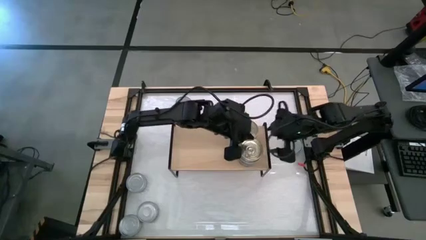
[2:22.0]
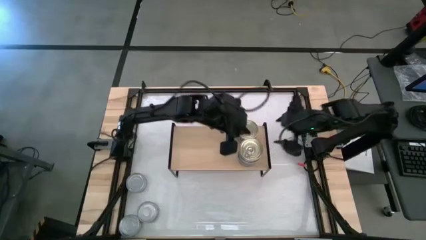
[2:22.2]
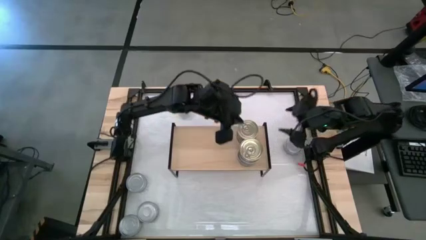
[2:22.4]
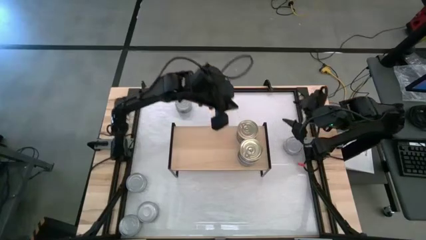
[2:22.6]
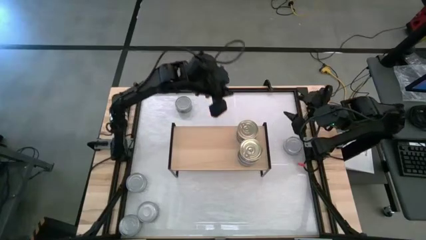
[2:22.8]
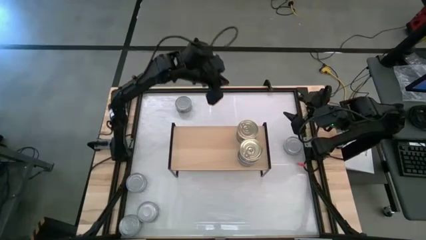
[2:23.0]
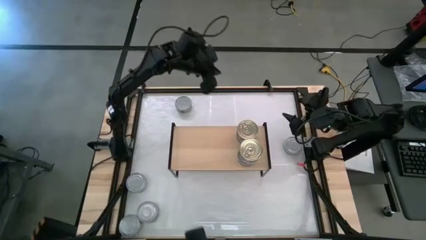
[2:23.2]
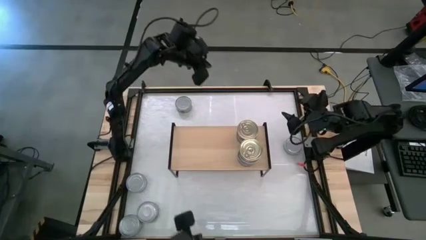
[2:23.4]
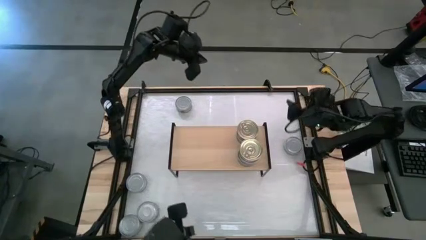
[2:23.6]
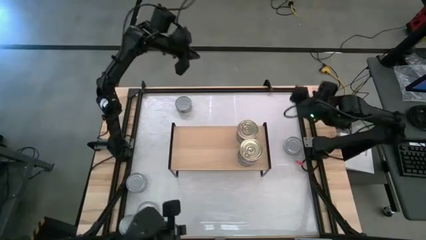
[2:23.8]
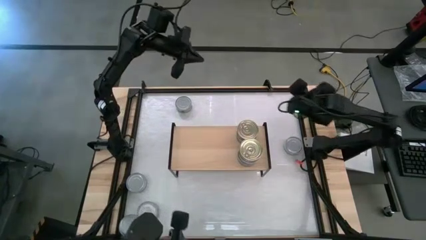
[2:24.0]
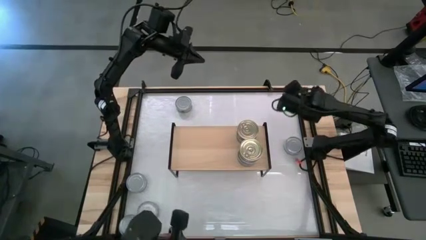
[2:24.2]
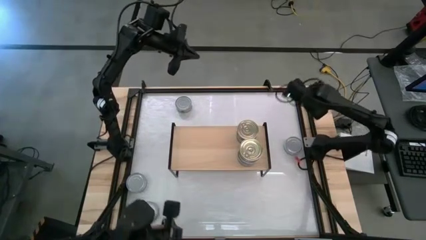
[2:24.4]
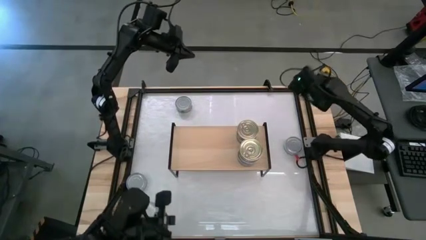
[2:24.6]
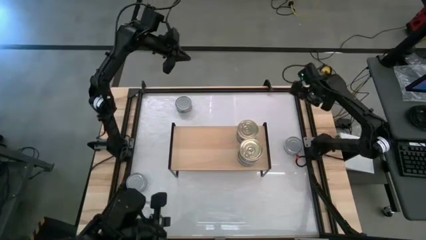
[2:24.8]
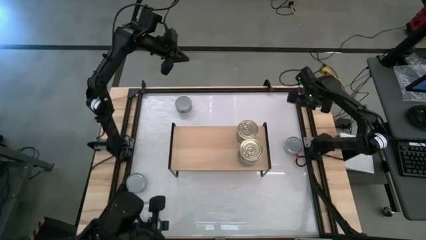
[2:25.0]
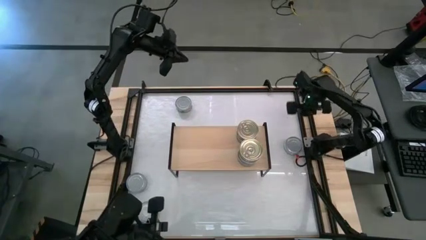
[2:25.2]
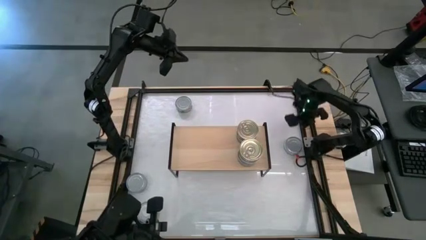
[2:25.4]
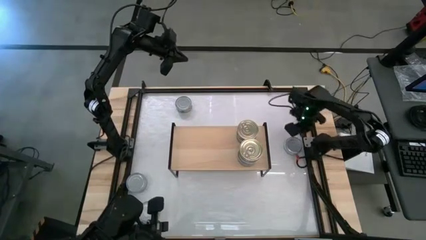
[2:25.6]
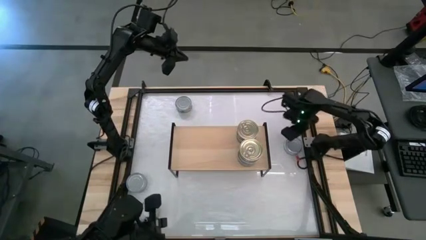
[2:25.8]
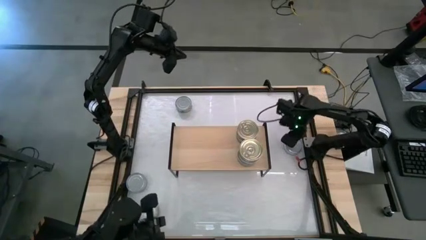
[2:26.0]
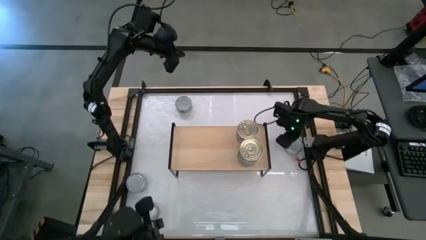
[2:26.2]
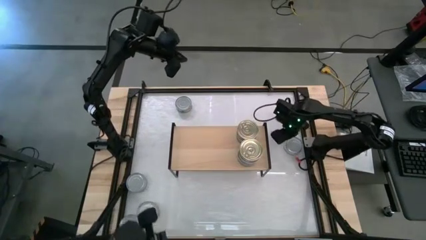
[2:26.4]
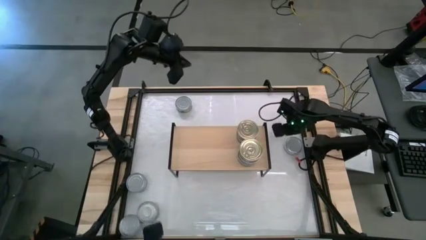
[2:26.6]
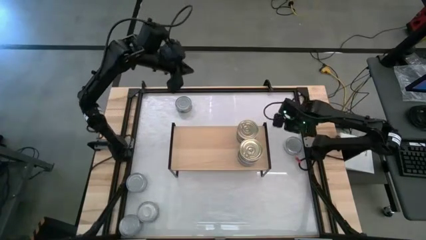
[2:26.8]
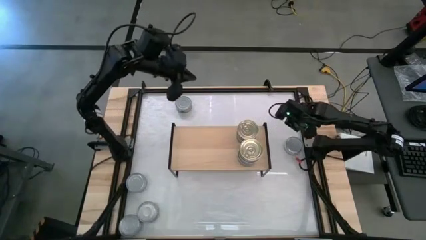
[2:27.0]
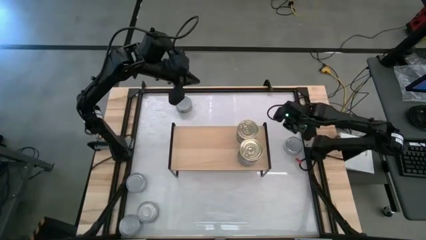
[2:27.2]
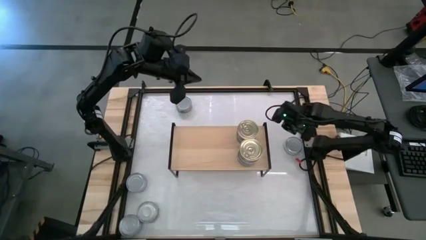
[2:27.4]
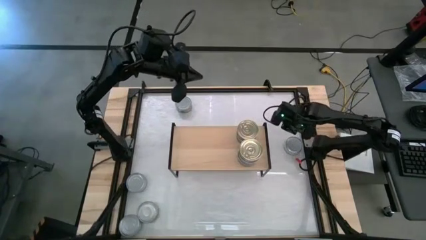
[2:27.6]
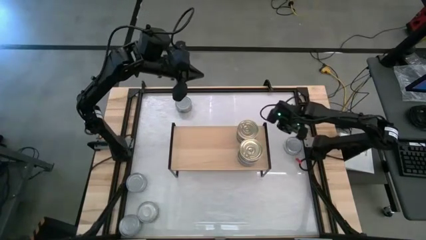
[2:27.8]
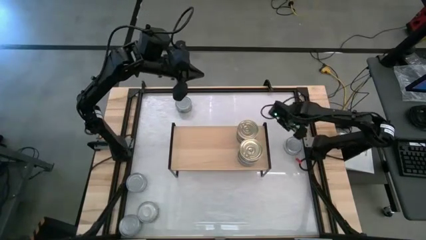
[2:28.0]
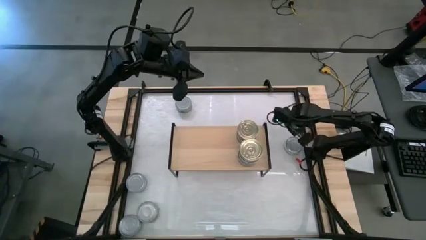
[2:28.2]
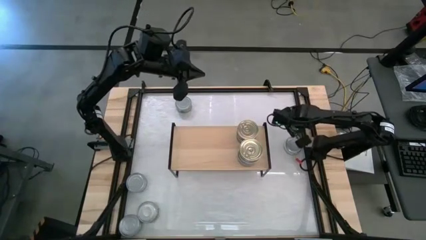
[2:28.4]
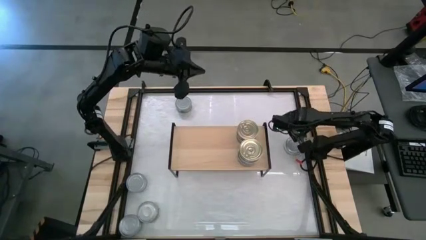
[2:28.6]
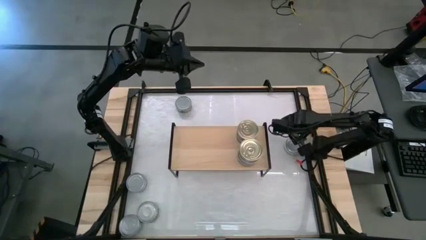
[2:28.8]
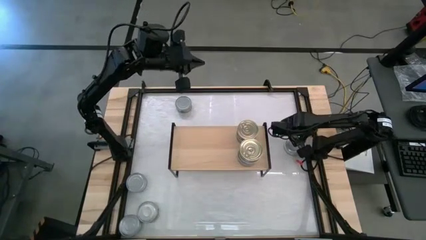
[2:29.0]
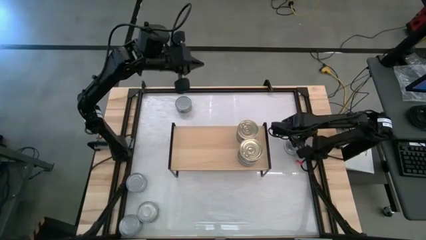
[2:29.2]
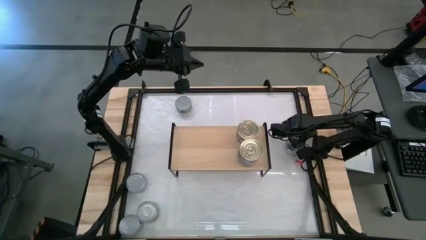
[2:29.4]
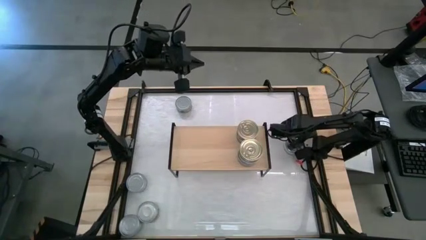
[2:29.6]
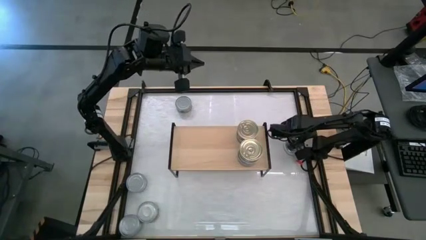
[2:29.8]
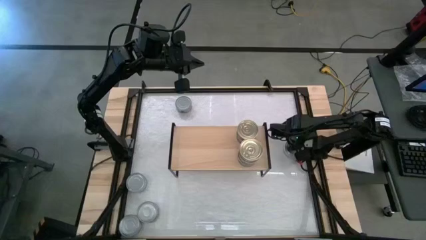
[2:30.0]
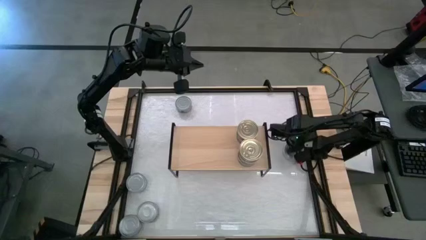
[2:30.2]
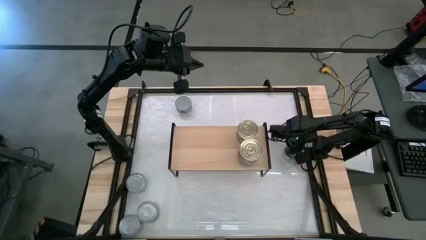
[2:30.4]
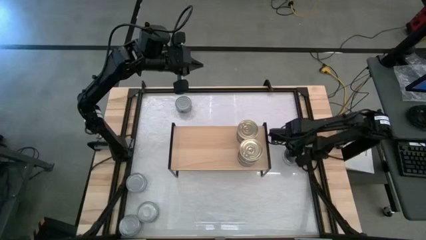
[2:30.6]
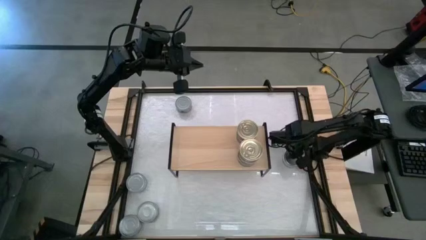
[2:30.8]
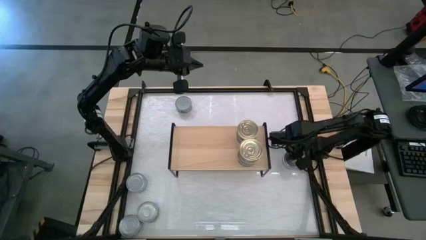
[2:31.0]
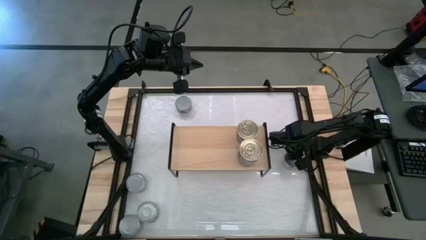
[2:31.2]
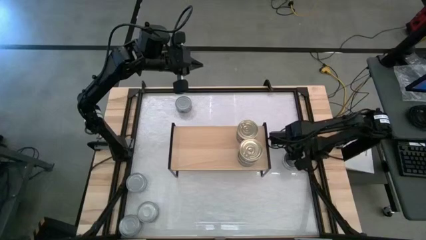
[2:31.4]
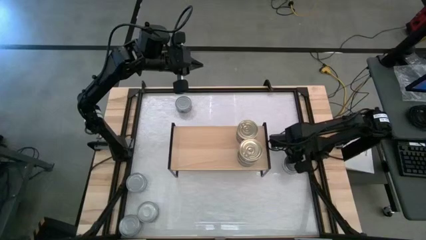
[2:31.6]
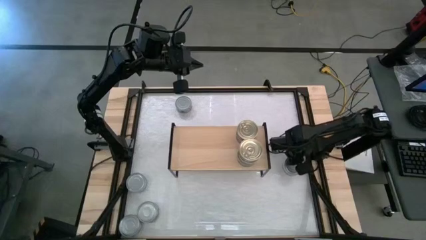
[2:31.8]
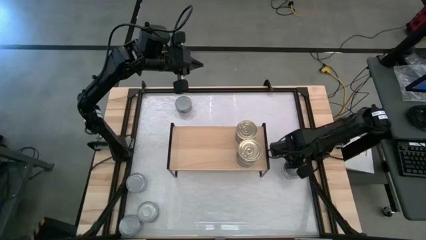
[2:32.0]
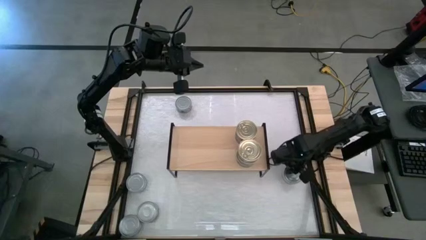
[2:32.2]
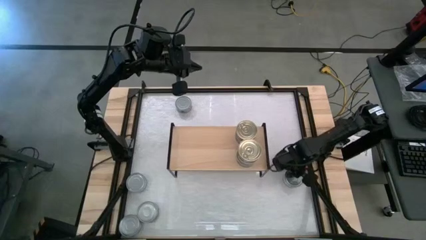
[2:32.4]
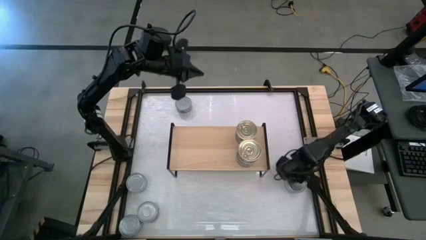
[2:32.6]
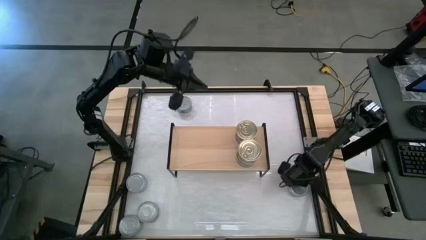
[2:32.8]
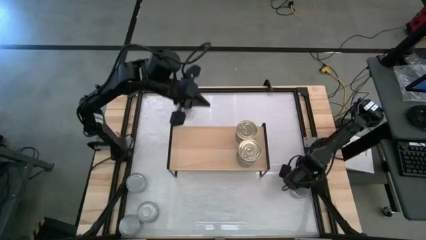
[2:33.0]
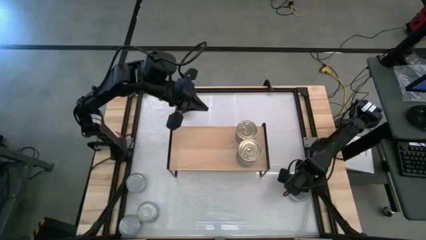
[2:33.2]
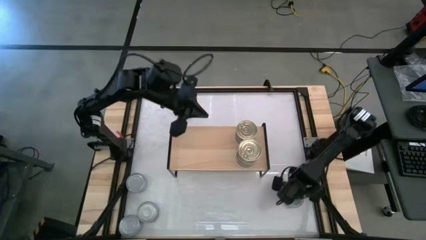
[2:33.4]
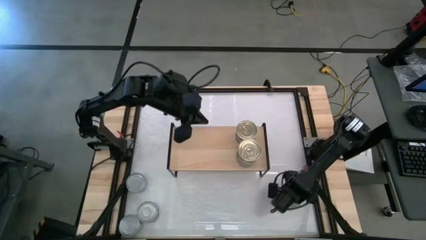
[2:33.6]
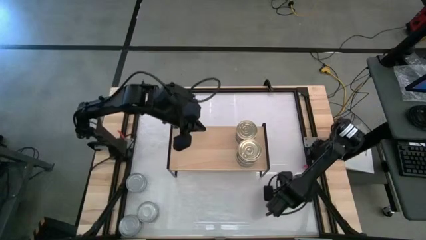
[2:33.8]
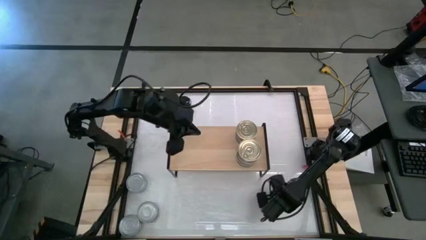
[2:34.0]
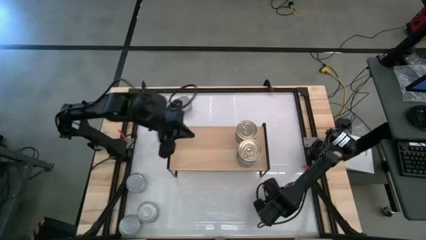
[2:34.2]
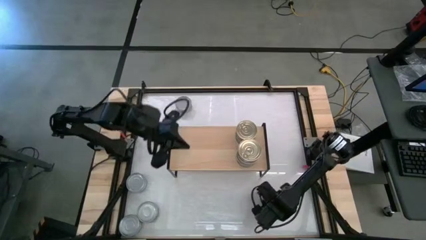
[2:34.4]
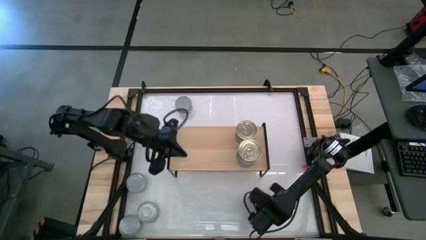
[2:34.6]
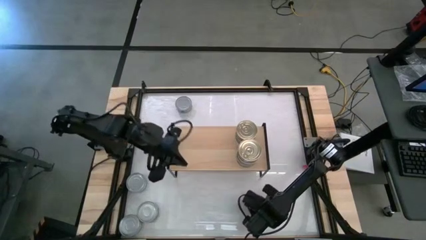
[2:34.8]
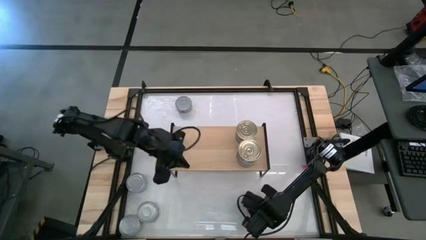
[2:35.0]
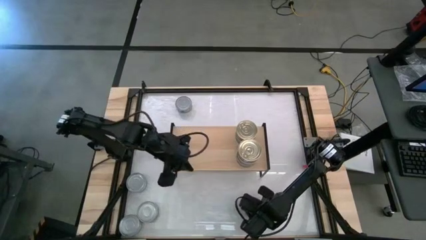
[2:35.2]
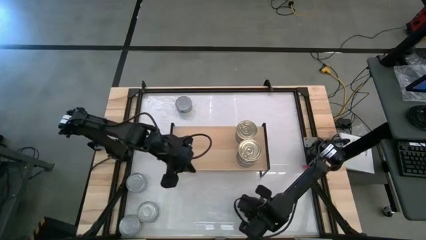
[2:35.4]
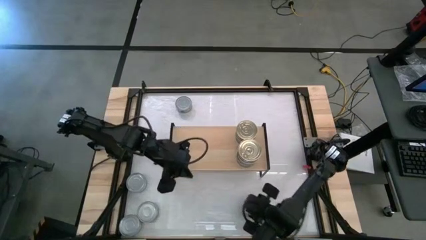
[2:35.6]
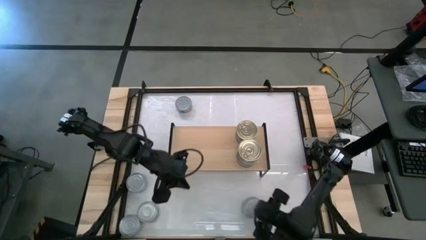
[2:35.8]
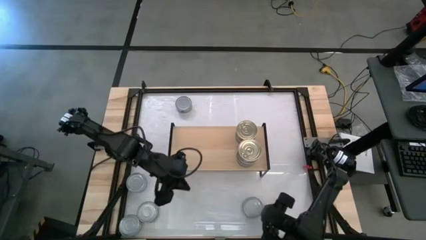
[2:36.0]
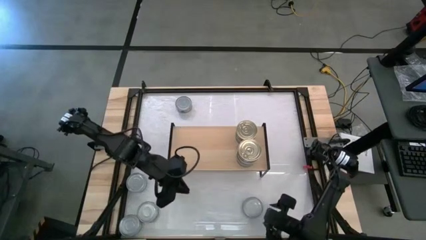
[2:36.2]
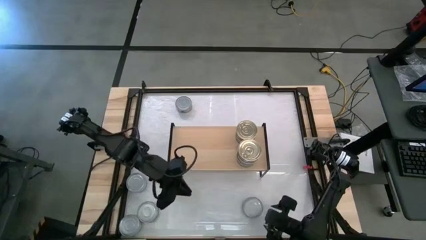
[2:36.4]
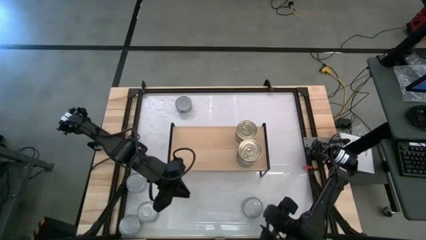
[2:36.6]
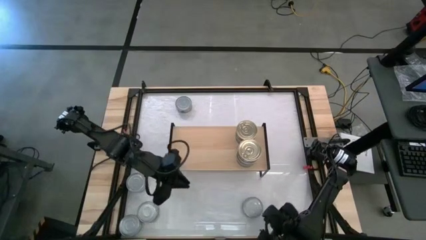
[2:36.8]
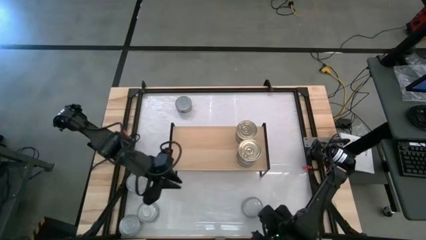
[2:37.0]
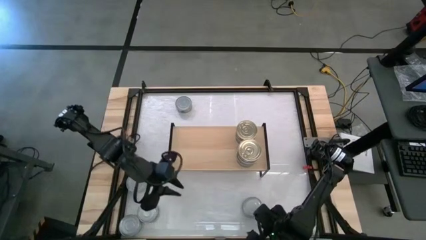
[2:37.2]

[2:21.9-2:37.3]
Task: Stack canned seafood by type on shelf
Put the green tuna can on the shelf
